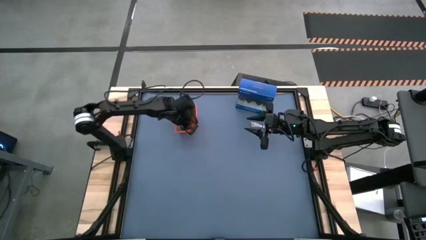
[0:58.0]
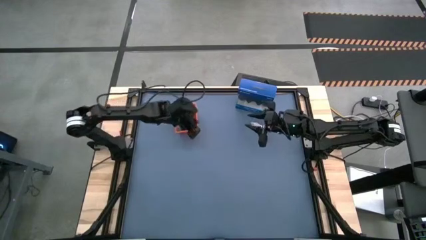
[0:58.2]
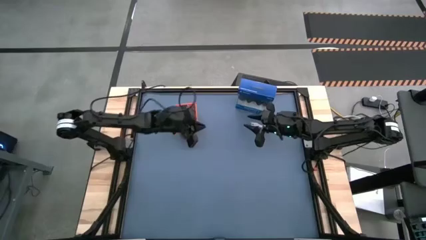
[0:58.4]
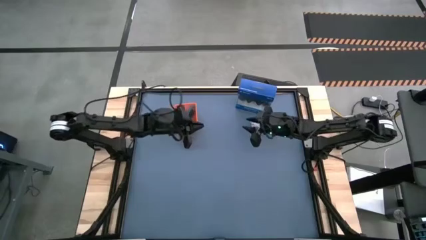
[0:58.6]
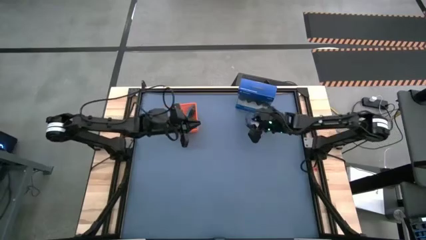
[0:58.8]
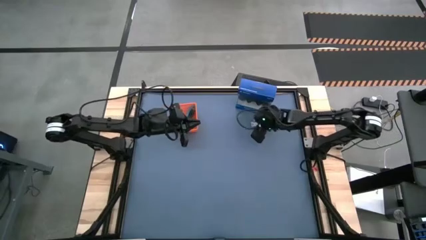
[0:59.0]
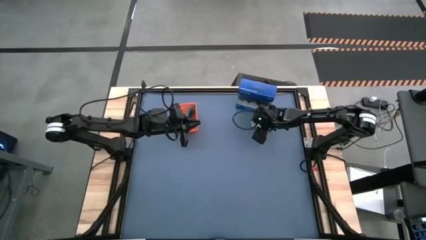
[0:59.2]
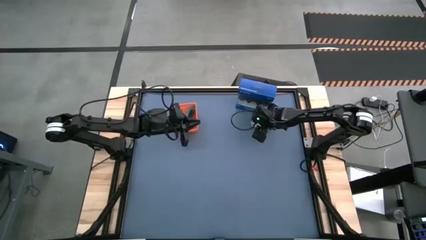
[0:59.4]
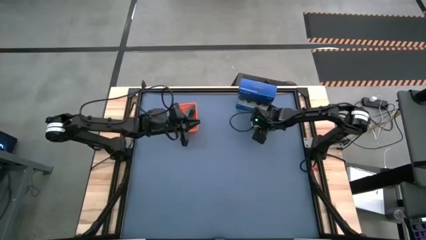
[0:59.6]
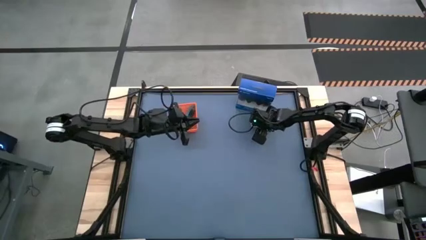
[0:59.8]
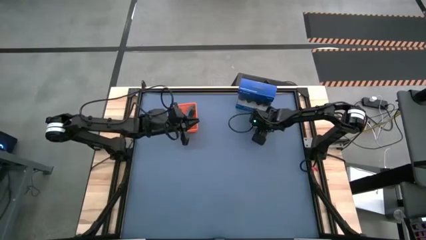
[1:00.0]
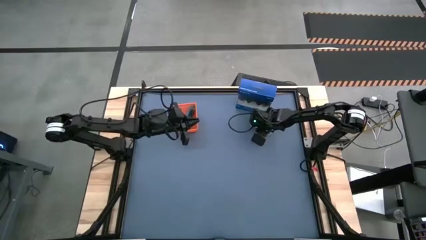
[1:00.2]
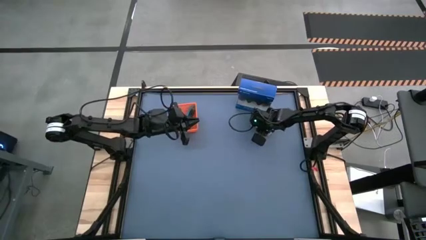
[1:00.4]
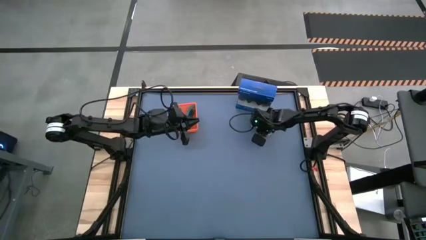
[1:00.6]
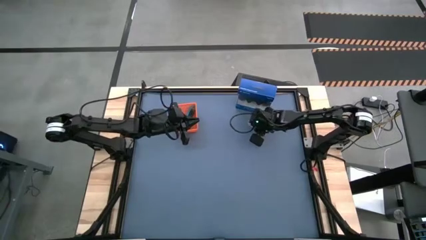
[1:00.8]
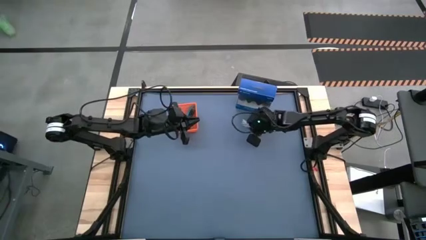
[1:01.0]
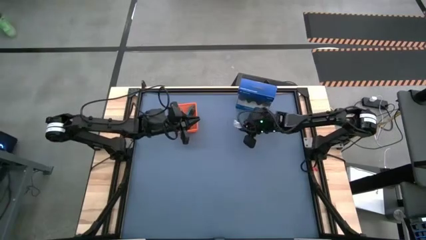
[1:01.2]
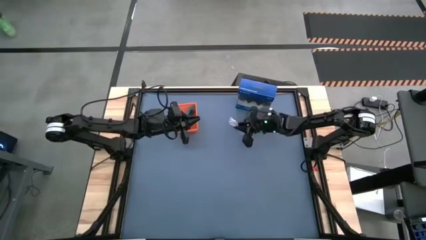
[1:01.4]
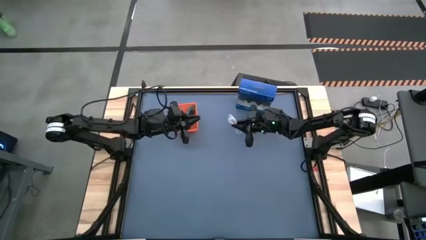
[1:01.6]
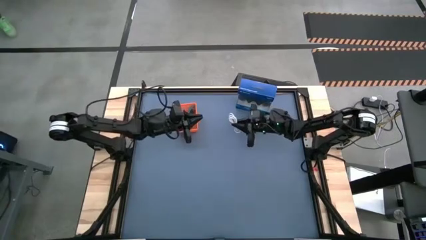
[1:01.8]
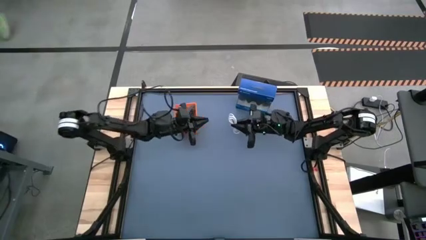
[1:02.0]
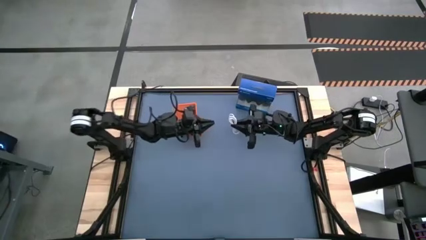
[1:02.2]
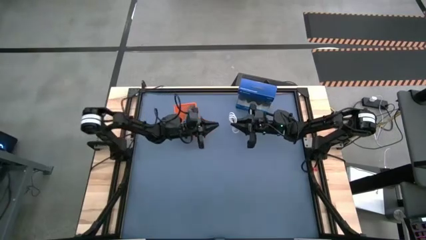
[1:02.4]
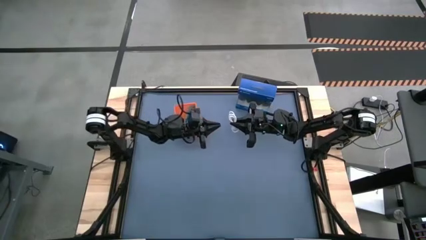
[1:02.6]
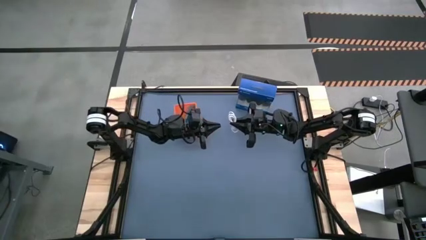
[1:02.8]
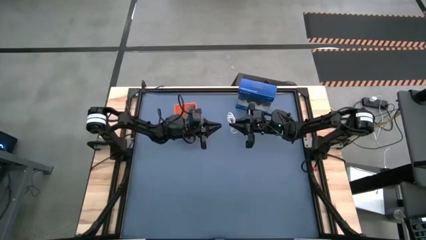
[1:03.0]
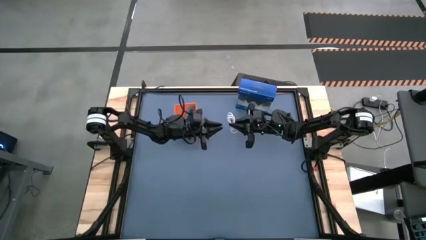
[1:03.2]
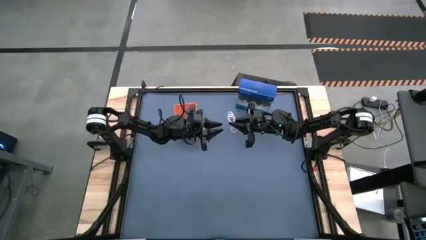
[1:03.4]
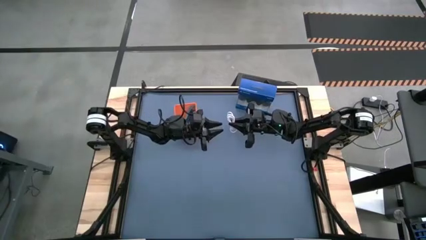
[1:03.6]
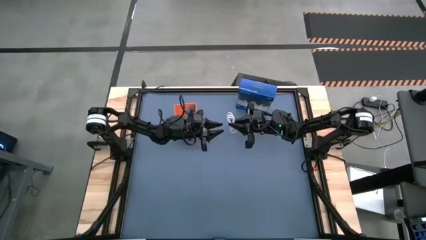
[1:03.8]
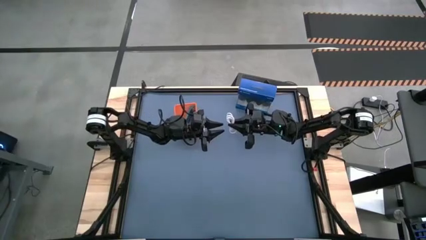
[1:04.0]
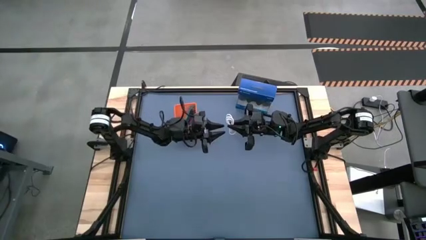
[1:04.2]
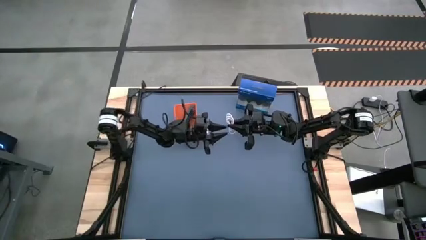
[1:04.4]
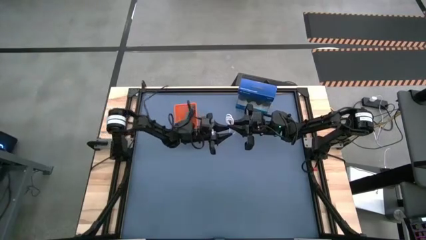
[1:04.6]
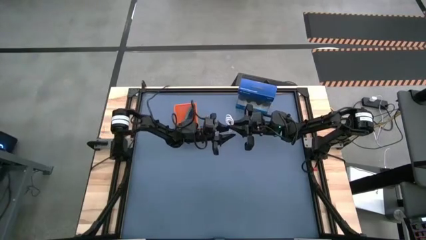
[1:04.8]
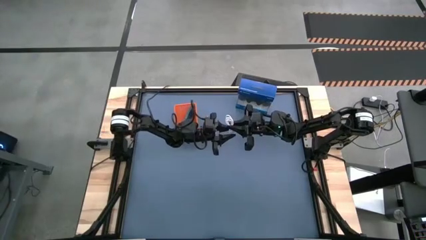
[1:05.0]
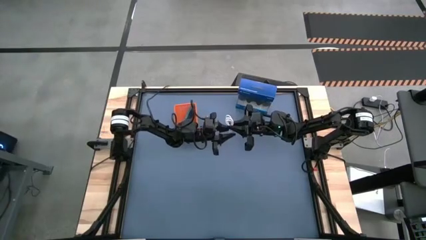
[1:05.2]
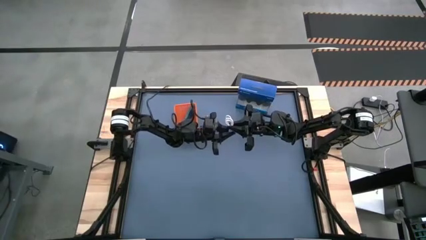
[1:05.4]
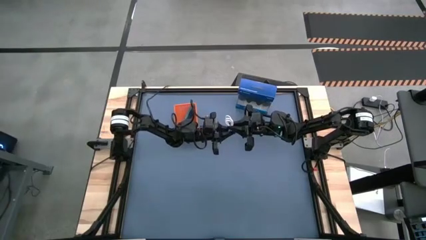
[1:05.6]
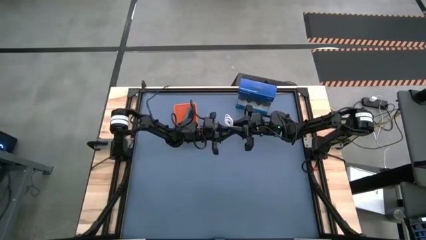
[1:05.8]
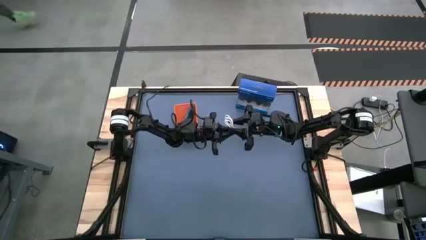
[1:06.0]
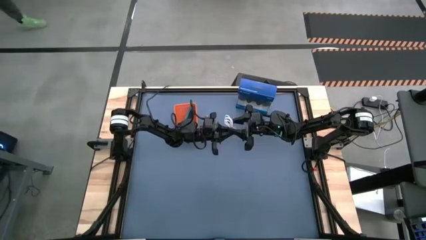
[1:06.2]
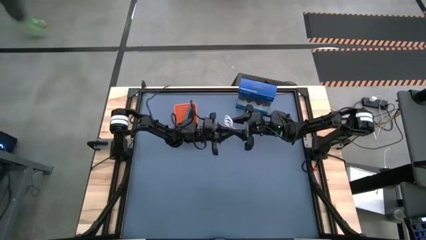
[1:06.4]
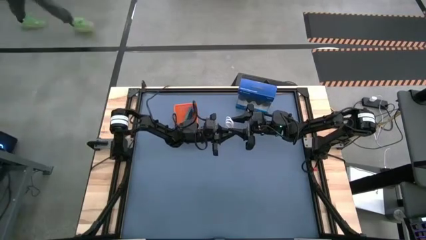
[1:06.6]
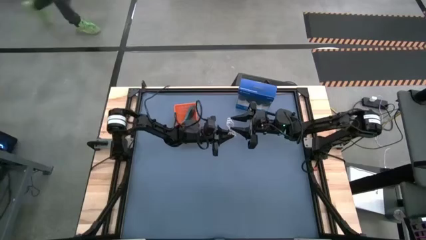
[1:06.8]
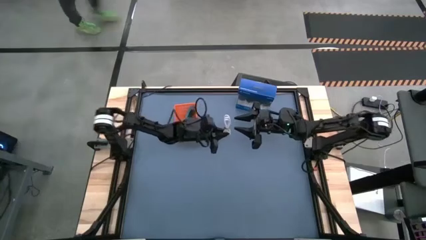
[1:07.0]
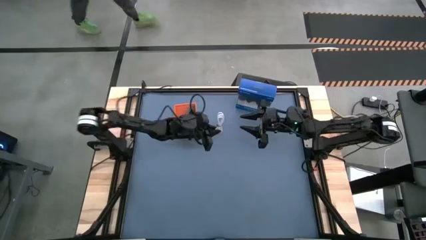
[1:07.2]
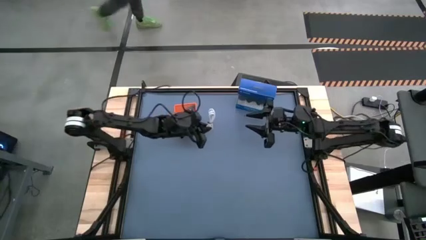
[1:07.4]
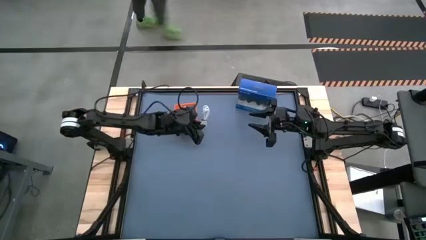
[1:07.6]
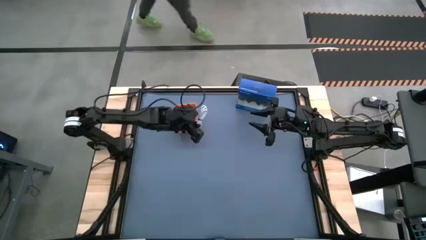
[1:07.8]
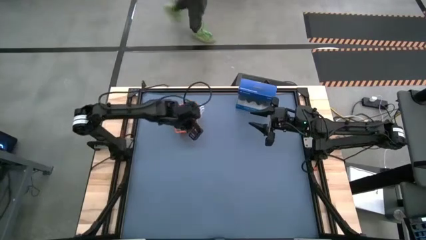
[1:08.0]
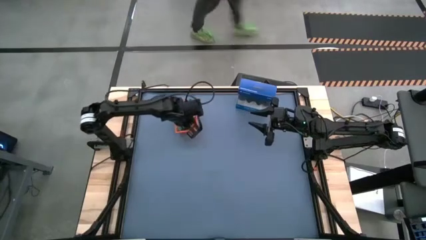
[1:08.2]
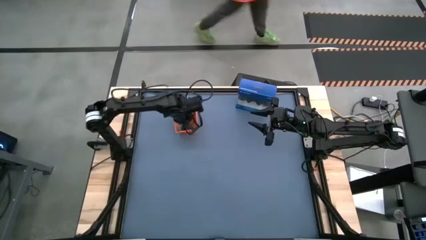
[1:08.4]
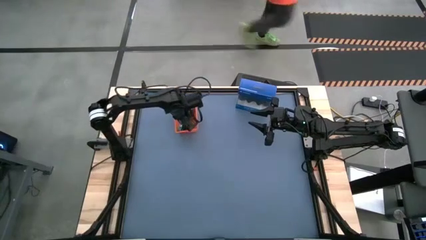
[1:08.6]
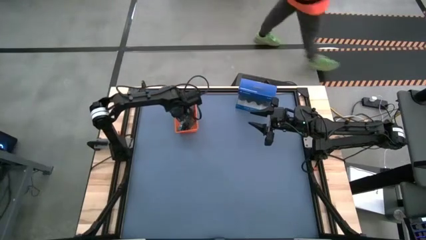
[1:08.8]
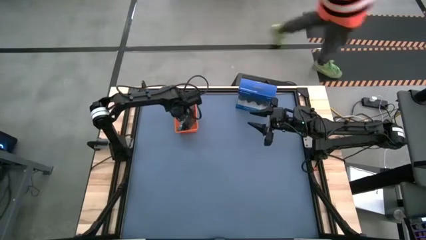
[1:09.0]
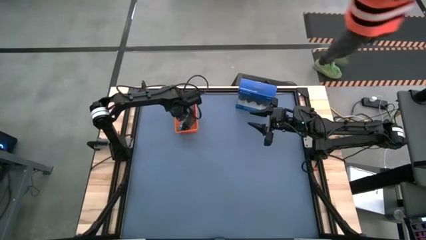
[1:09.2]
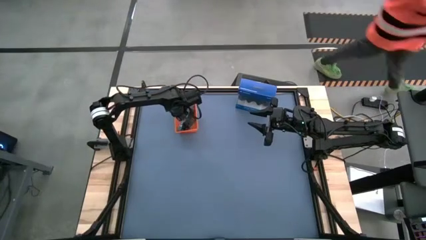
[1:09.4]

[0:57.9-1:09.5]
Task: Pick and place USB-C Cables
Put the white charger cable into the orange bin
